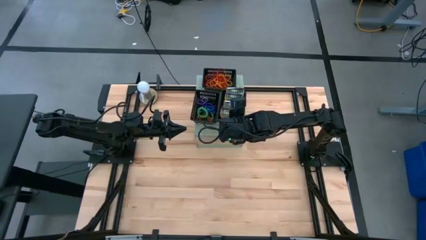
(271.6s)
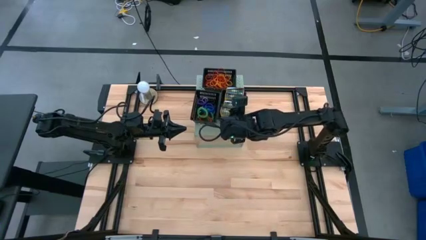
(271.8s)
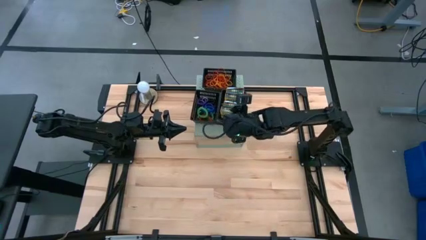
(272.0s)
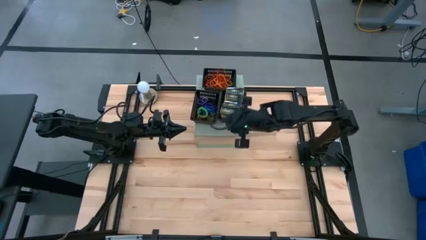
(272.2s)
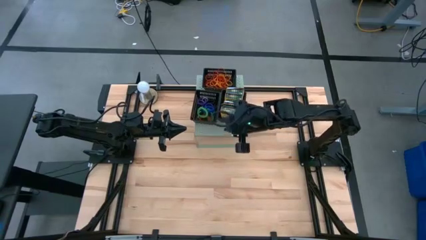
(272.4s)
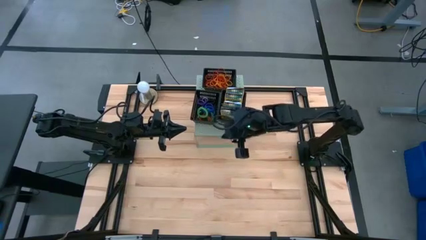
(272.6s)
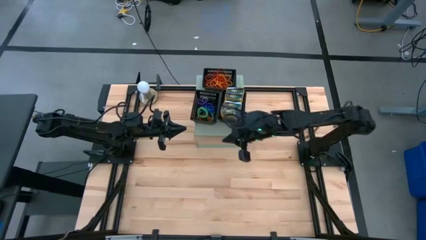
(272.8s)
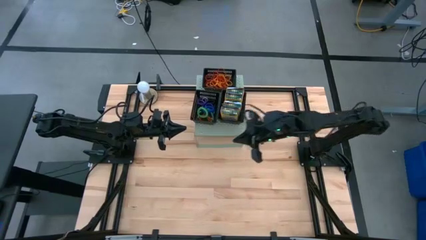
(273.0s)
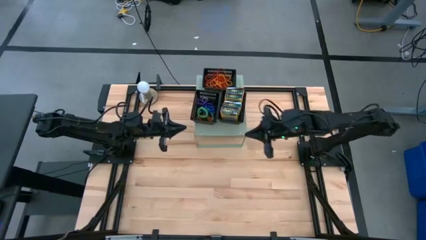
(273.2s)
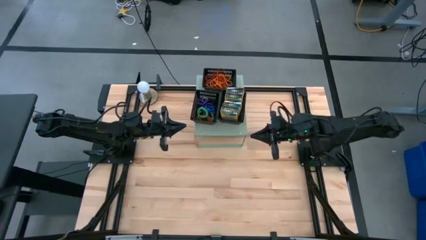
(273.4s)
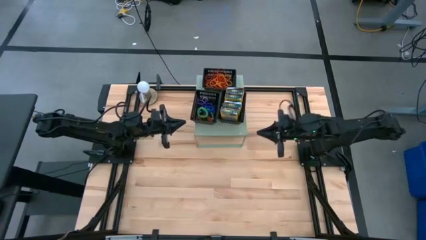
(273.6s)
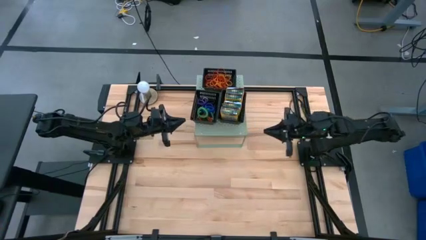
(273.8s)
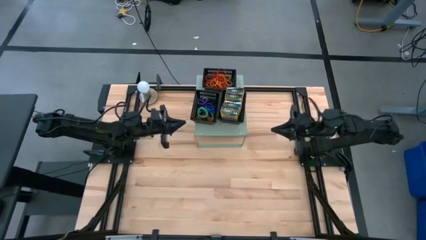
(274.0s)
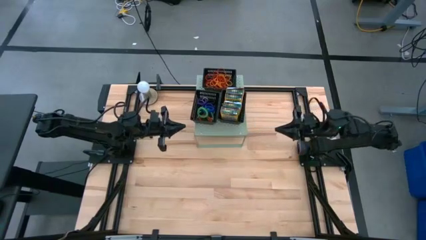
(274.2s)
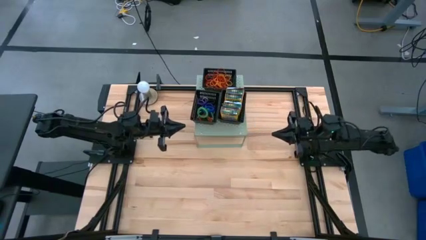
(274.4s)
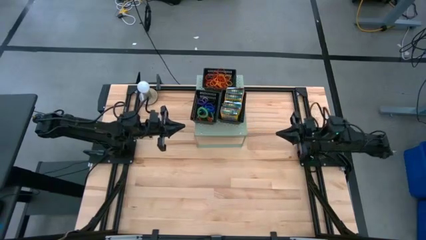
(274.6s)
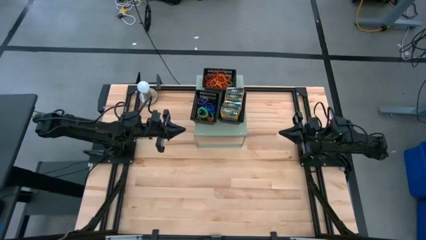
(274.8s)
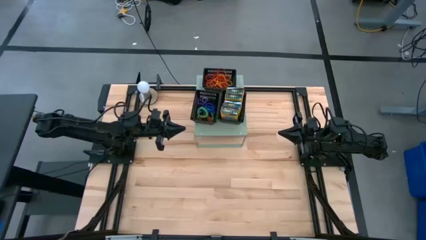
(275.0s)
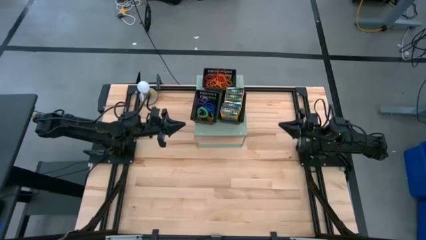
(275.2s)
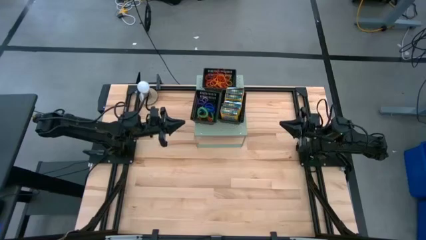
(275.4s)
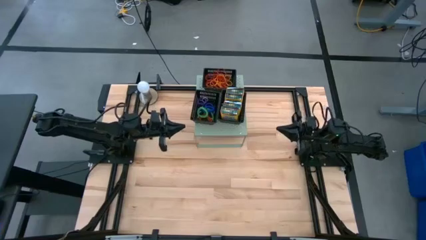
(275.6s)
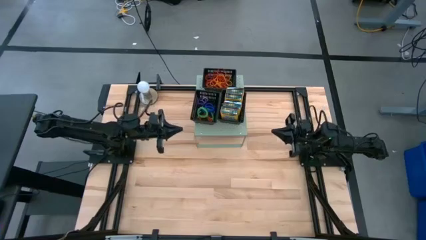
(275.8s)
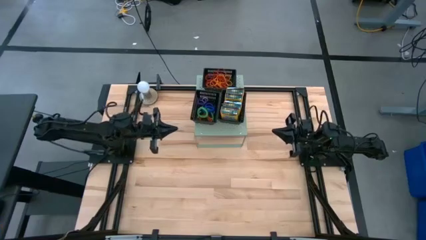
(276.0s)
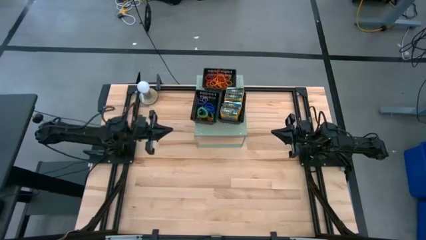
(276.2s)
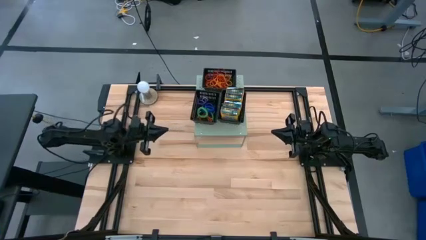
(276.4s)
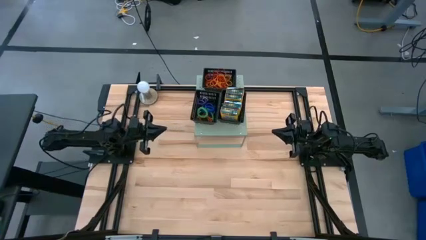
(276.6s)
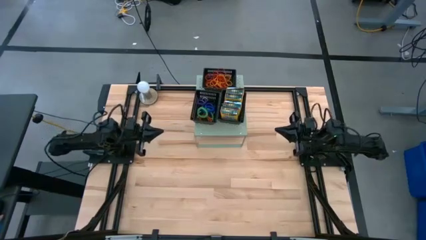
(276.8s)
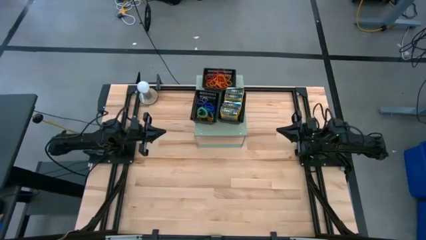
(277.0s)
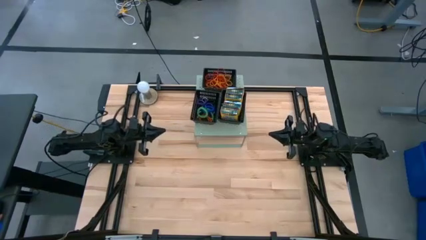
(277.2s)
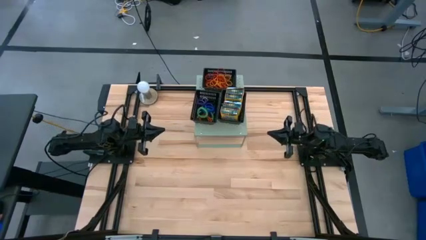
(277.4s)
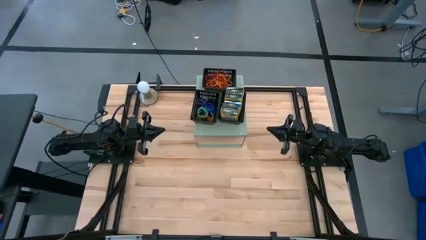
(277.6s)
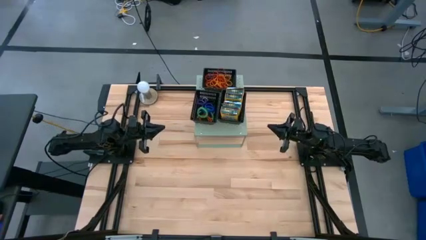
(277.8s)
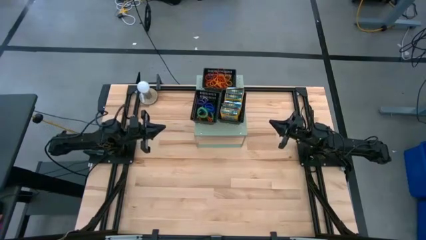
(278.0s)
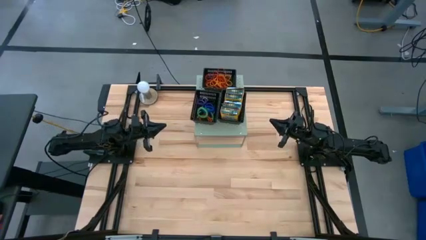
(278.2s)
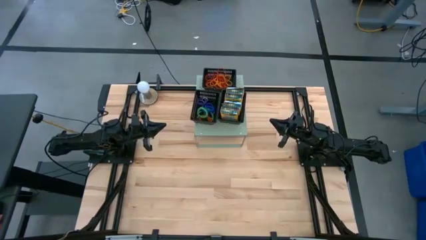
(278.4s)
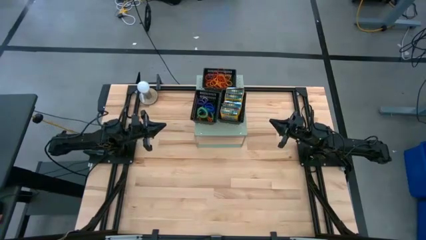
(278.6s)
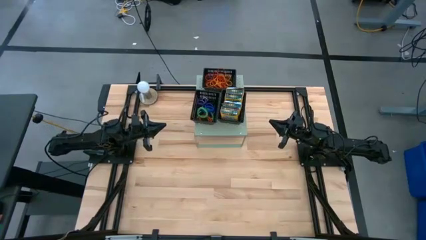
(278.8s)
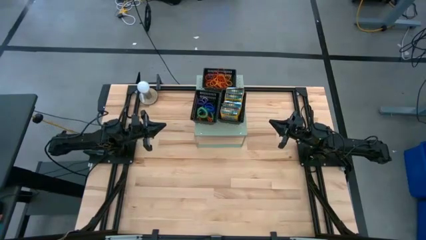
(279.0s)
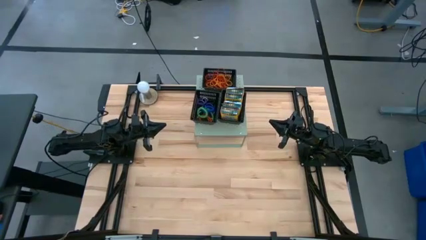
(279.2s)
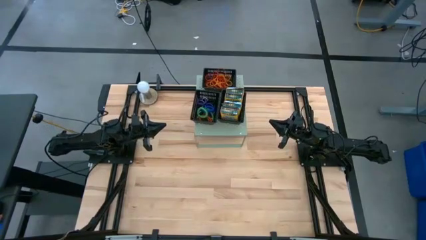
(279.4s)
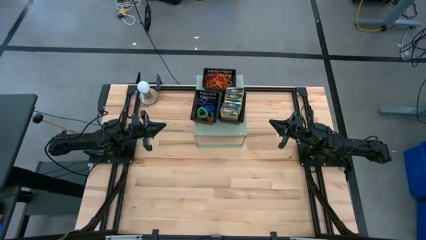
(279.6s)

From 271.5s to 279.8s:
Task: Pick & Place Office Desk Supplies
Return to Home Position

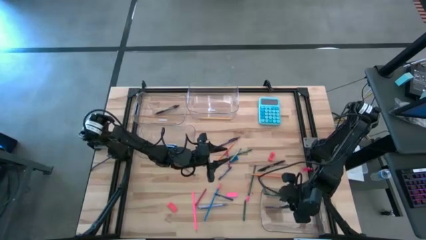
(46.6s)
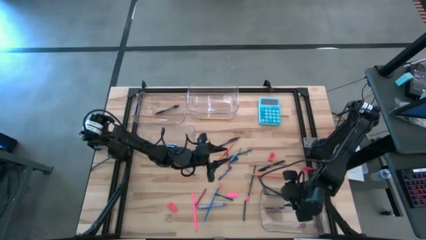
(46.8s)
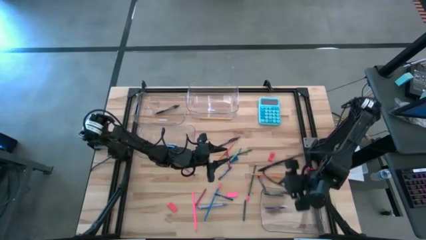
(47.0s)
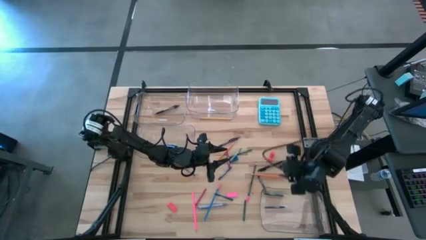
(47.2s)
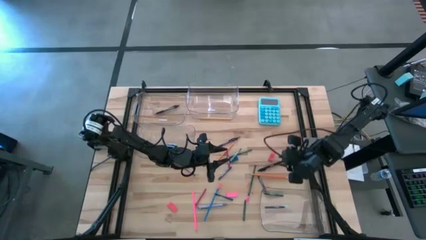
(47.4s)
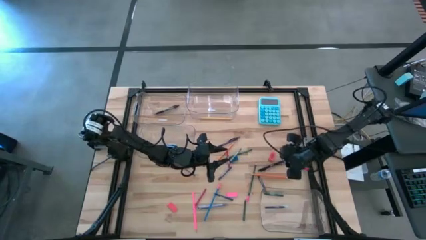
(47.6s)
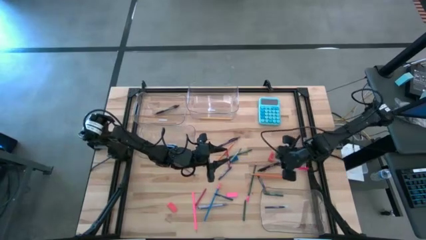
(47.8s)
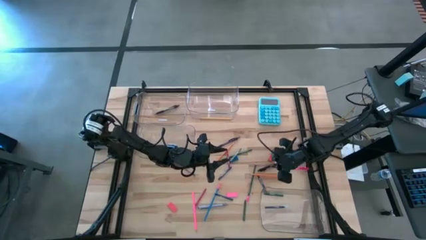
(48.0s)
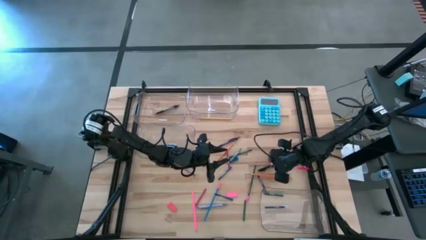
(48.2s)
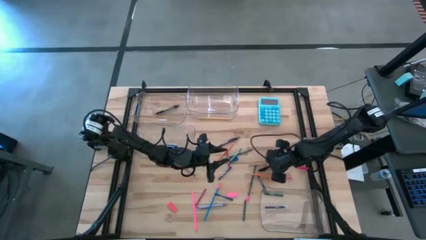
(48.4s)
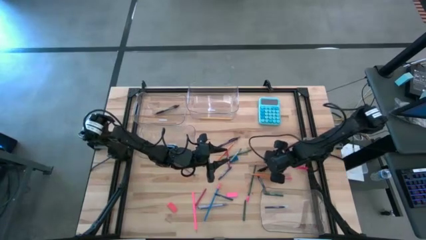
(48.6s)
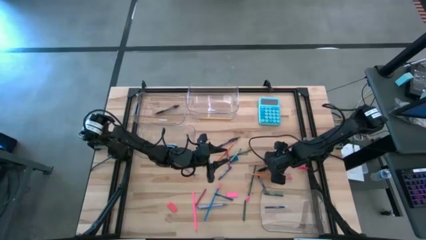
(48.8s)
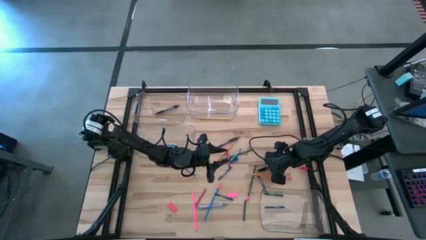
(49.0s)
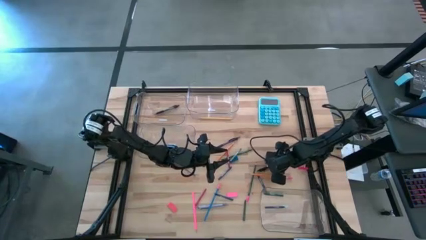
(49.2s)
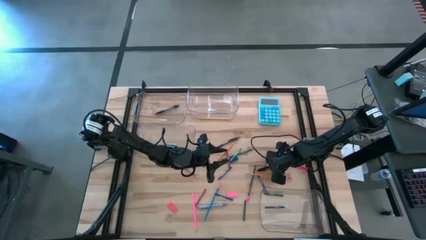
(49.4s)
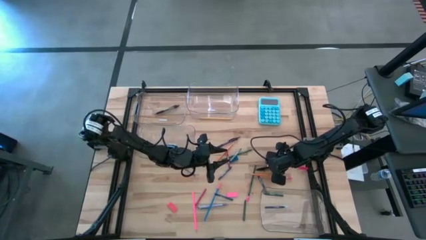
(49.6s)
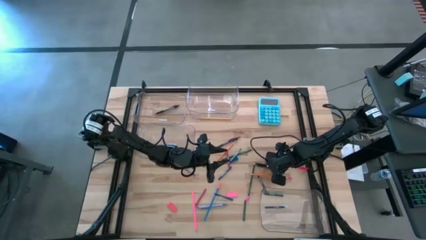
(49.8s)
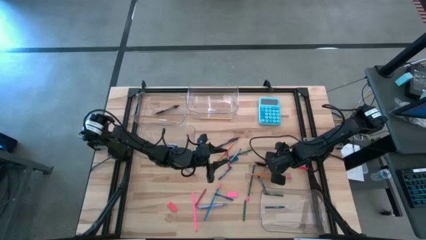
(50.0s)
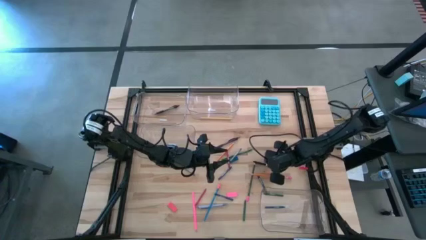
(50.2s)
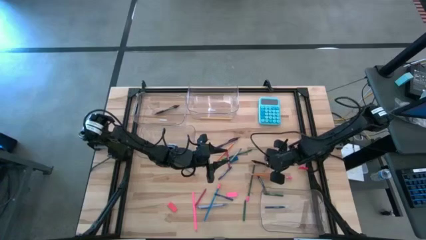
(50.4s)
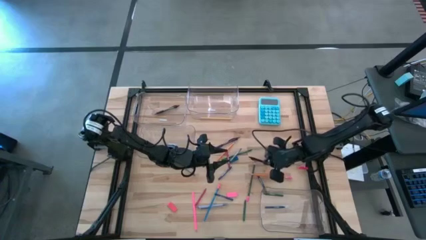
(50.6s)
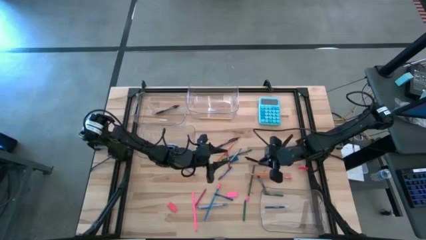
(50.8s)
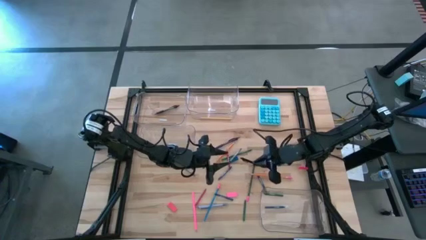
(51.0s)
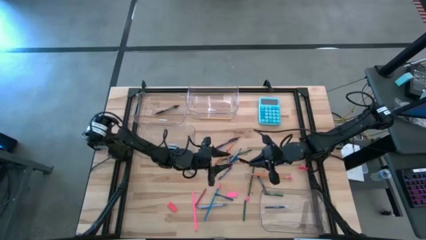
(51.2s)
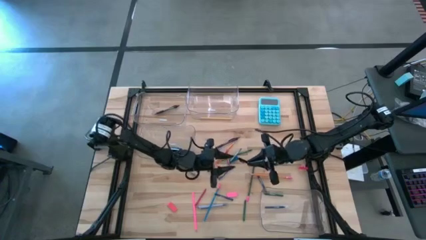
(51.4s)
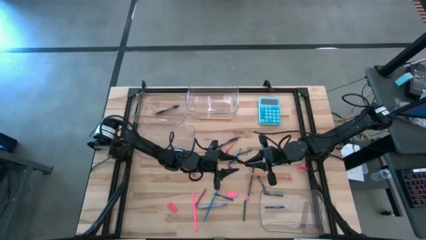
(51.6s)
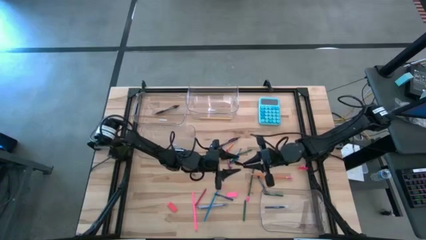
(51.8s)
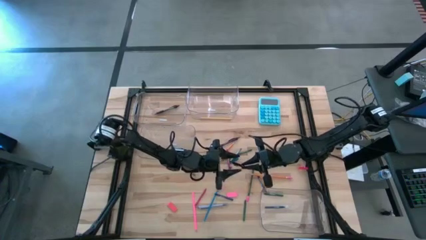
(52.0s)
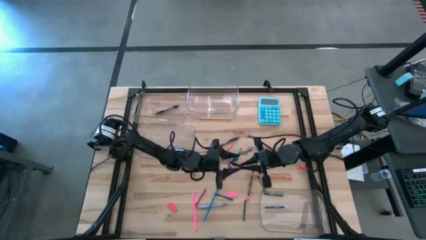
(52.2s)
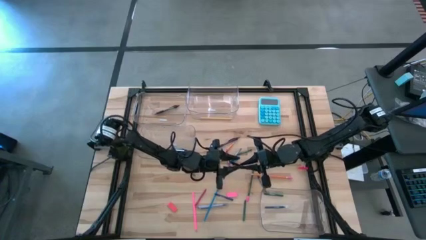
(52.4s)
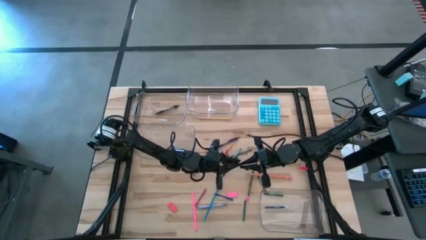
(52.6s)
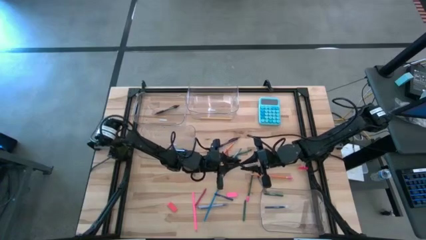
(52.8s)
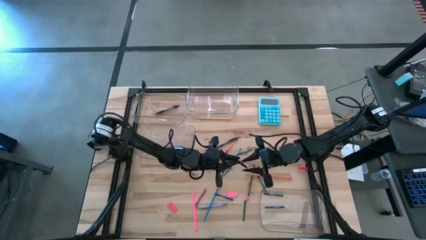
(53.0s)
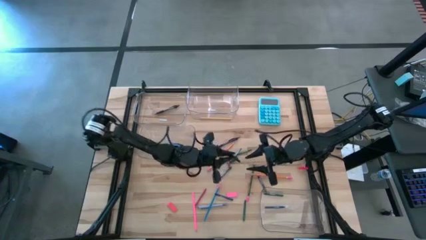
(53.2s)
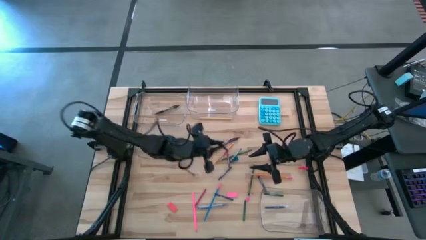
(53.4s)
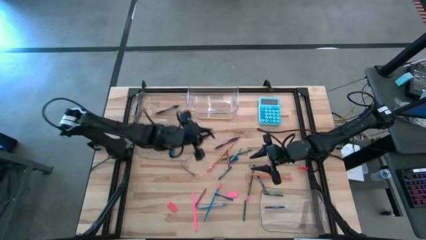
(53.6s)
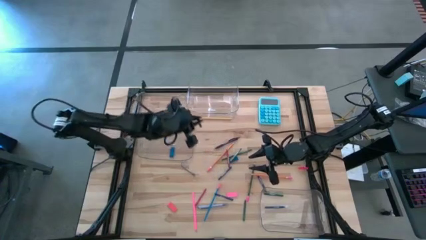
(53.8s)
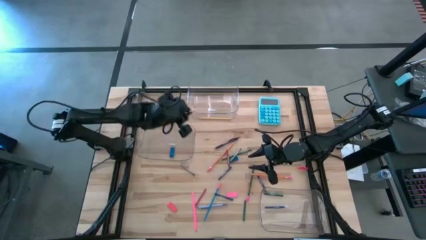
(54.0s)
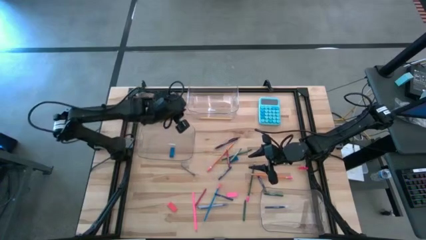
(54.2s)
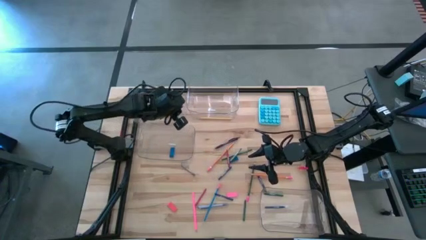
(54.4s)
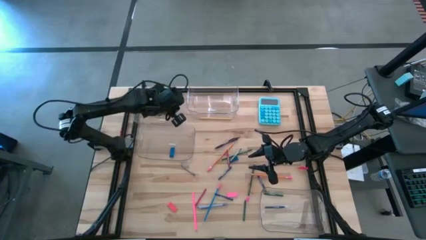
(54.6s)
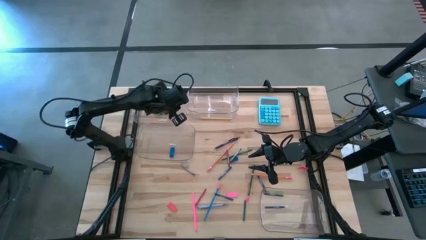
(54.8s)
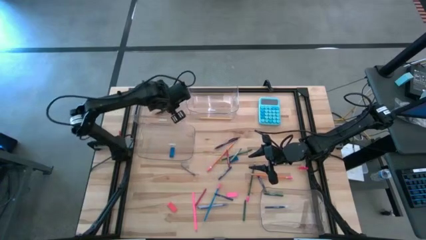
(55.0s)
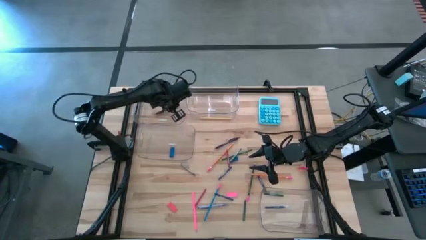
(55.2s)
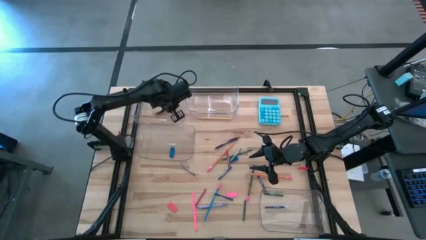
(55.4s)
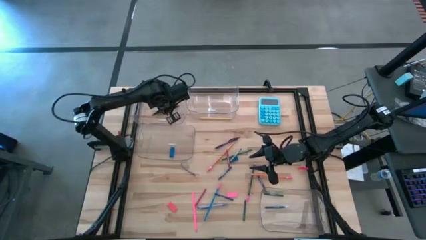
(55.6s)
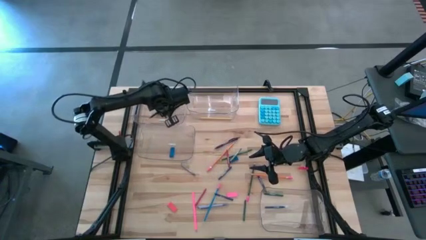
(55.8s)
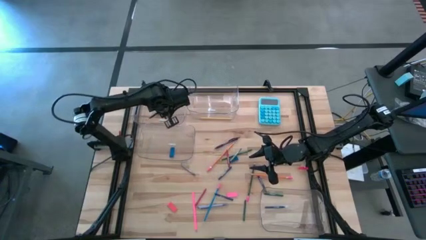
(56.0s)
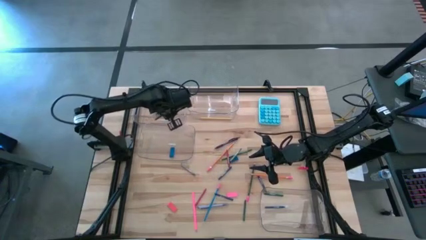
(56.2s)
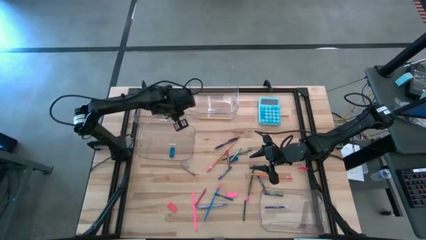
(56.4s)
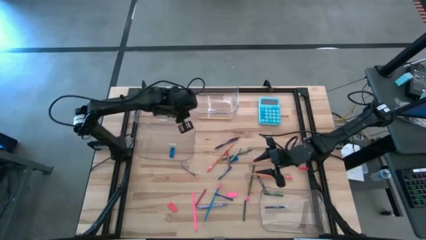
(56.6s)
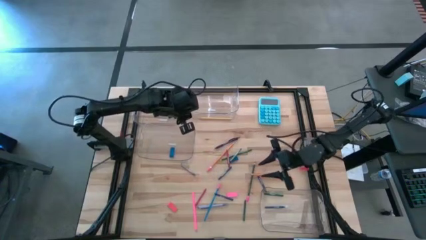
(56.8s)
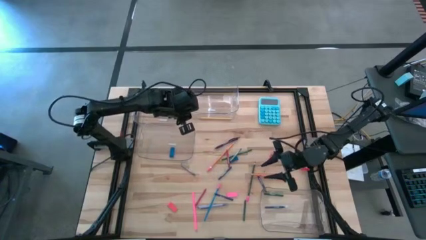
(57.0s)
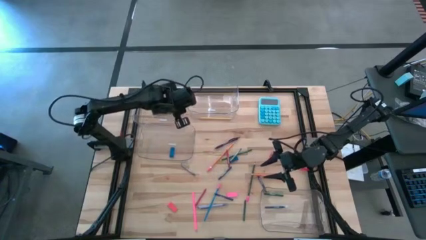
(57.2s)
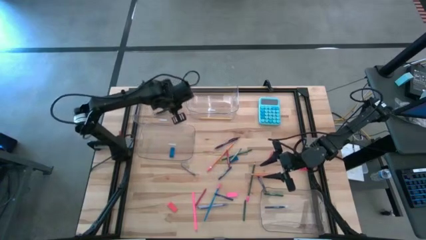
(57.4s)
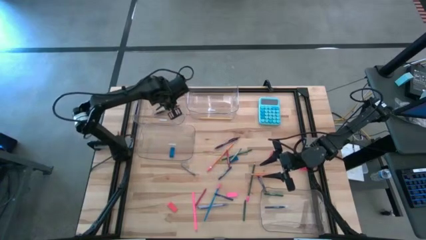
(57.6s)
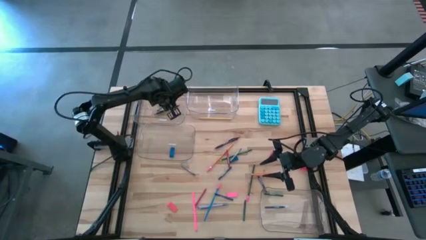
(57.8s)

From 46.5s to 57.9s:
Task: Sort crayons/erasers/pens/pencils in bins
Put the black pen into the top left transparent bin
